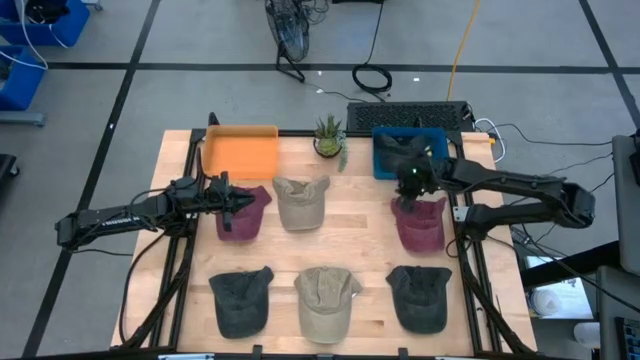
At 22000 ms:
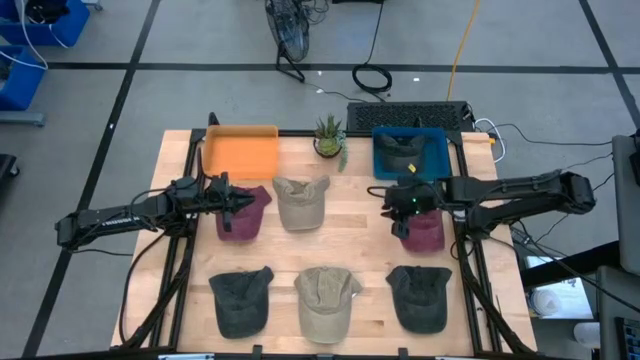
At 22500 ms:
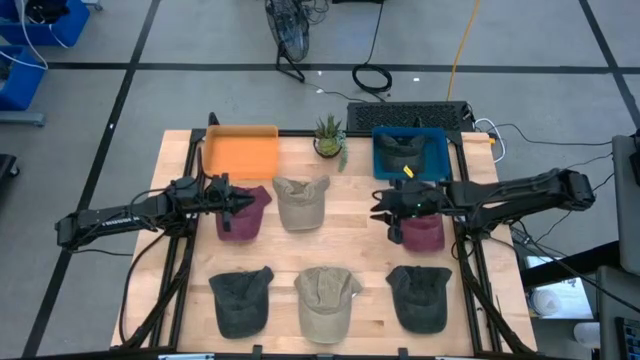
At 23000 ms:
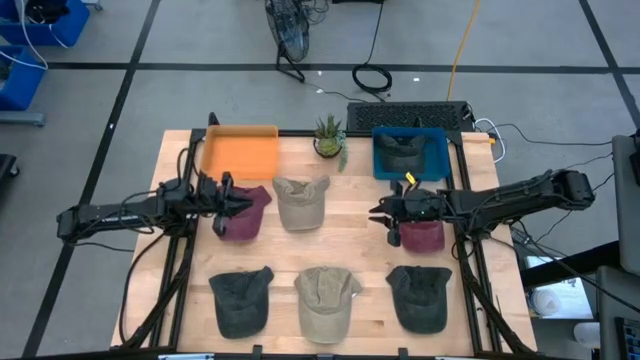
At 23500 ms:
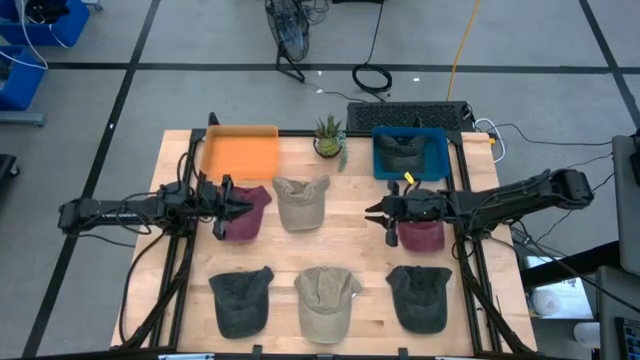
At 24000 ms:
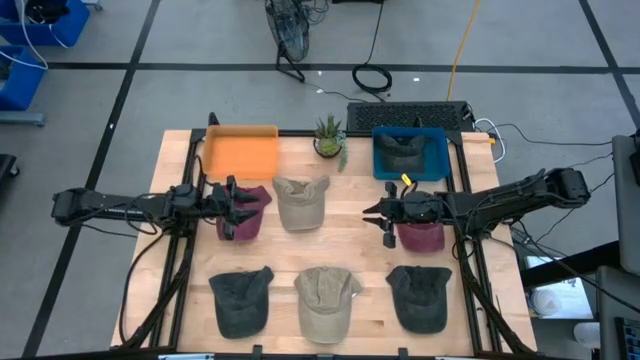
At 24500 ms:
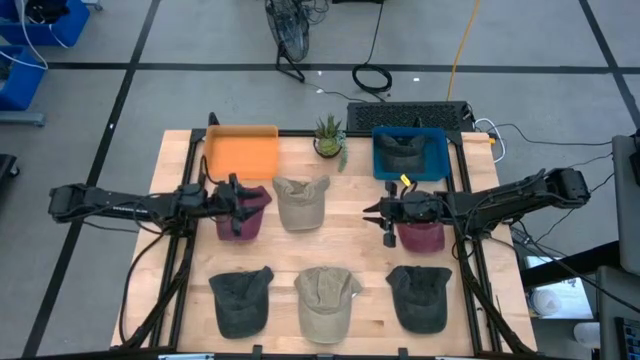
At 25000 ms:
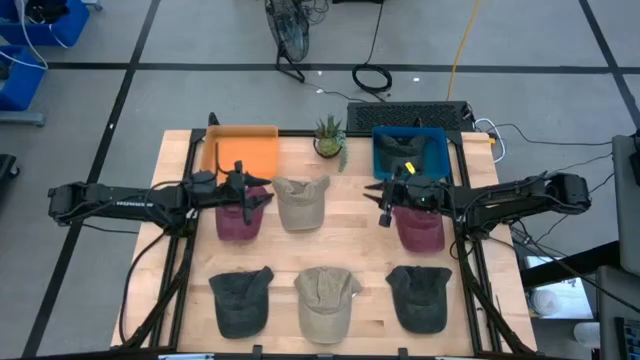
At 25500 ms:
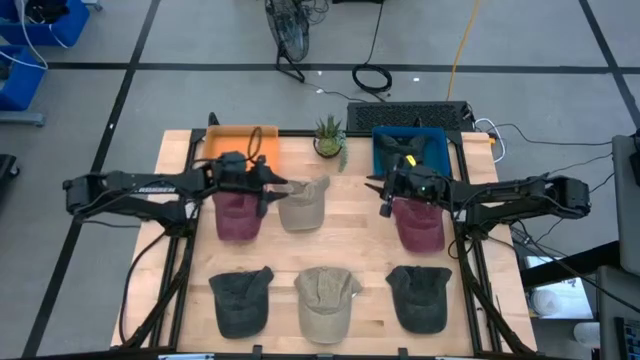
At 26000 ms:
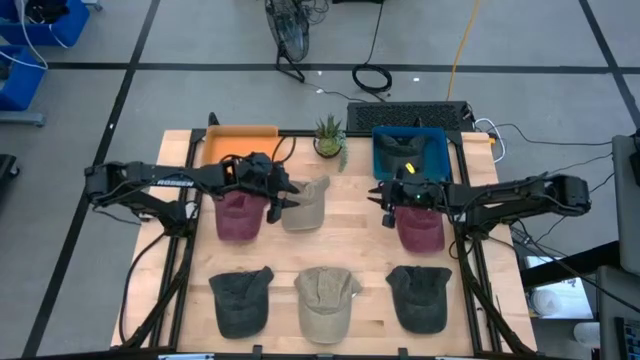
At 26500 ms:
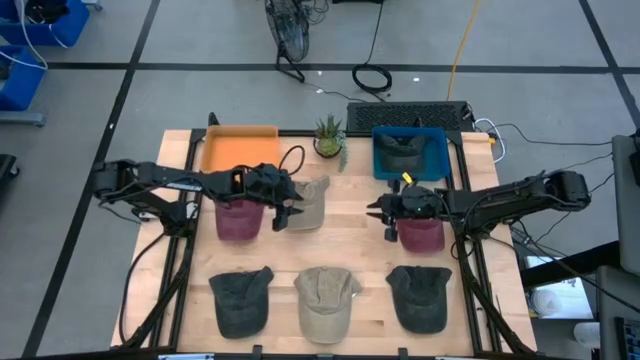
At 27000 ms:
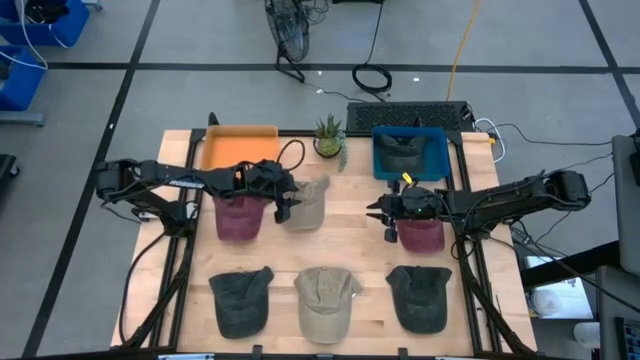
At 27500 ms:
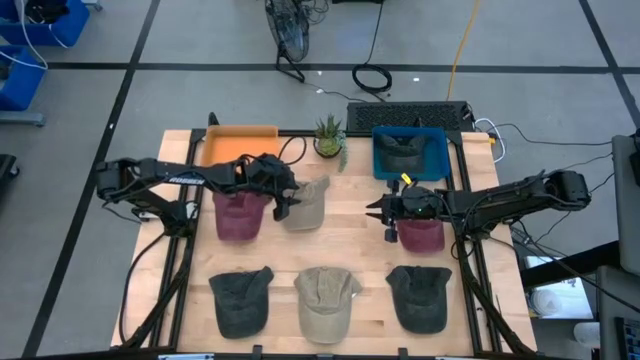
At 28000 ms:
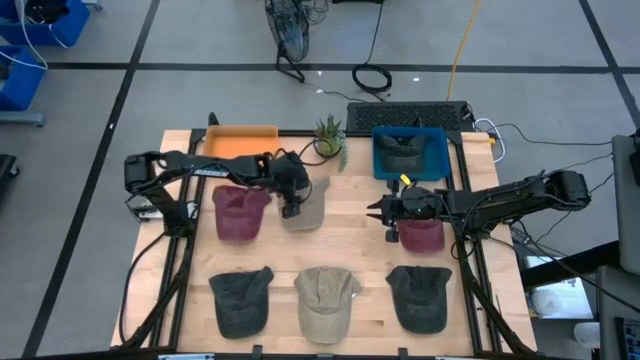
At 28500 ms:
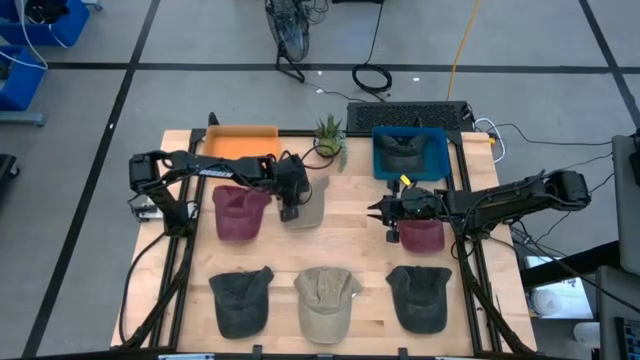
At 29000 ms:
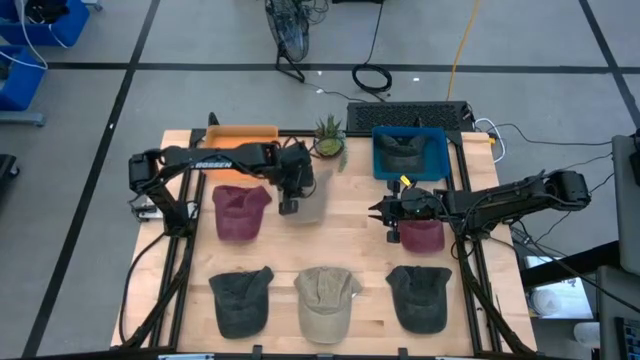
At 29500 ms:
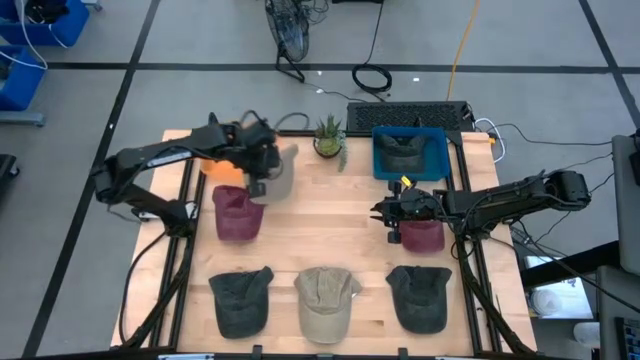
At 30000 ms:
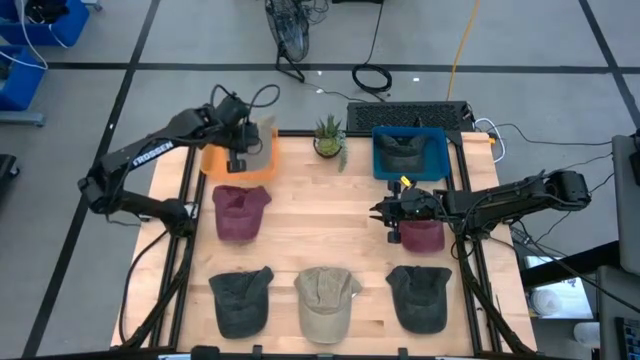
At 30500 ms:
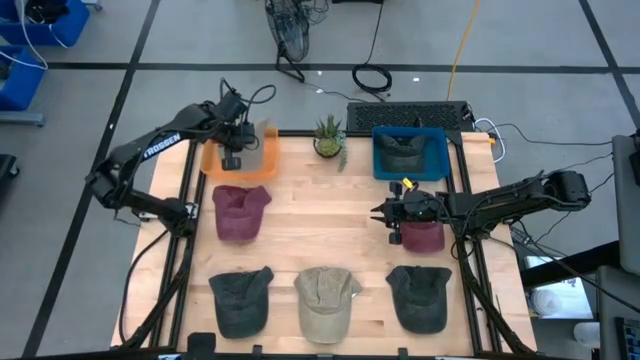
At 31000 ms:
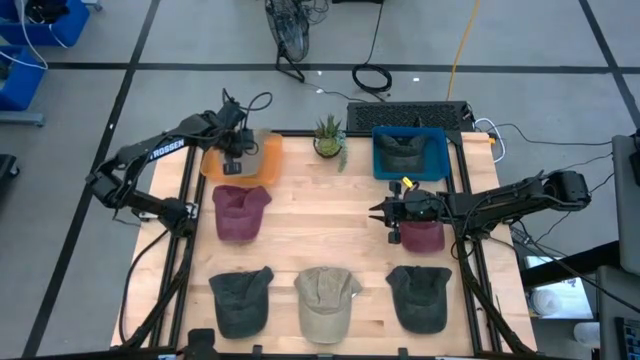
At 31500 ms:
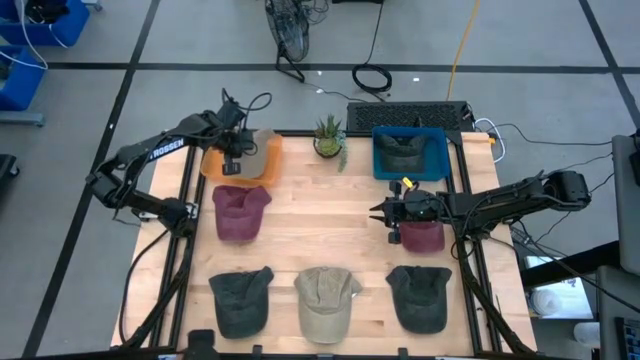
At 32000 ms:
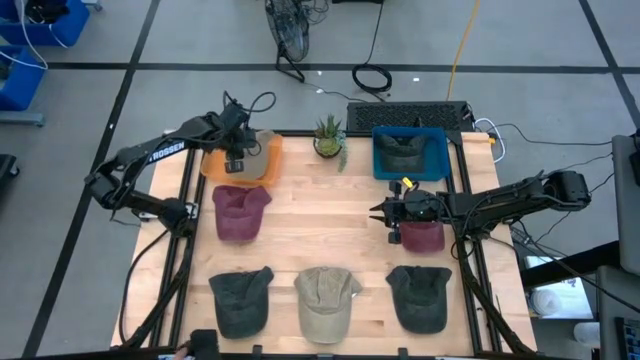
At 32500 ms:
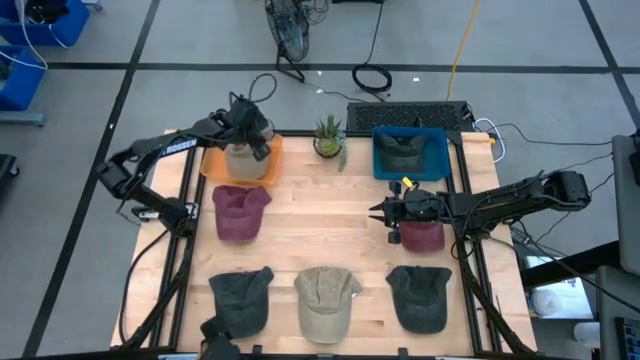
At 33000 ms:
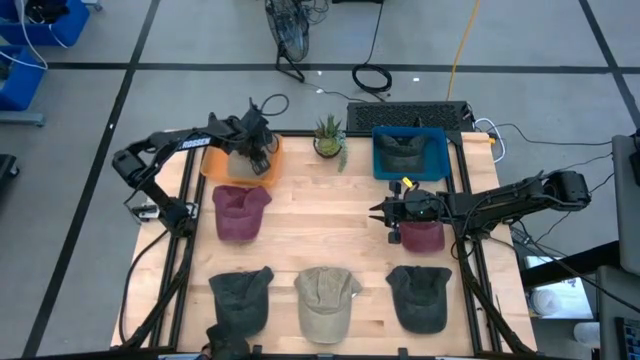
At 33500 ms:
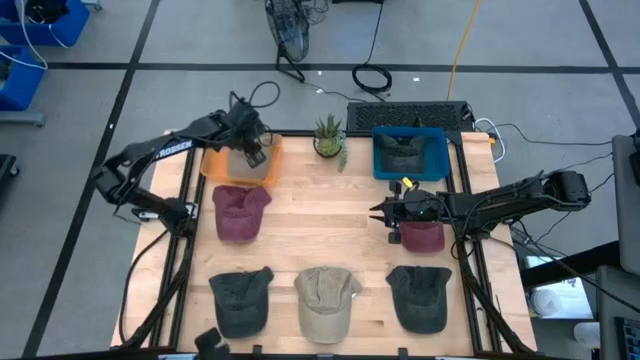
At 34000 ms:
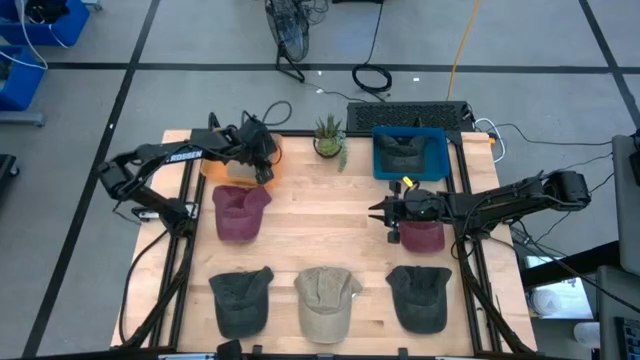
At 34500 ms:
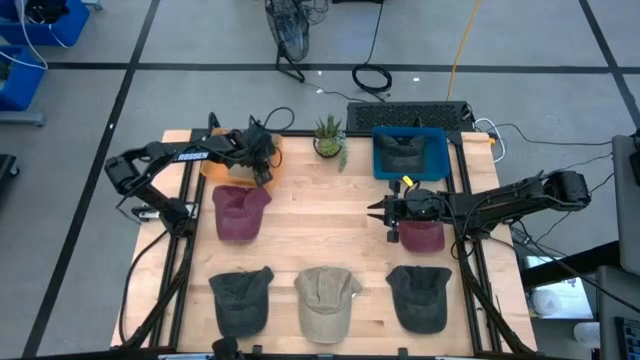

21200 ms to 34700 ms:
Task: Pick & Place hat
Put the top brown cap into the orange bin

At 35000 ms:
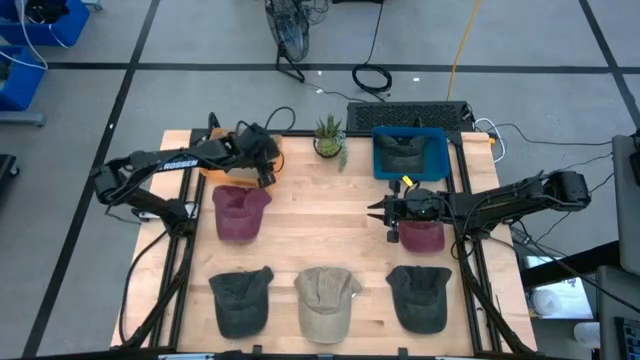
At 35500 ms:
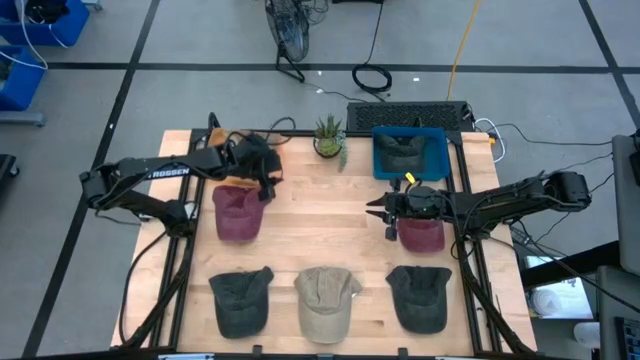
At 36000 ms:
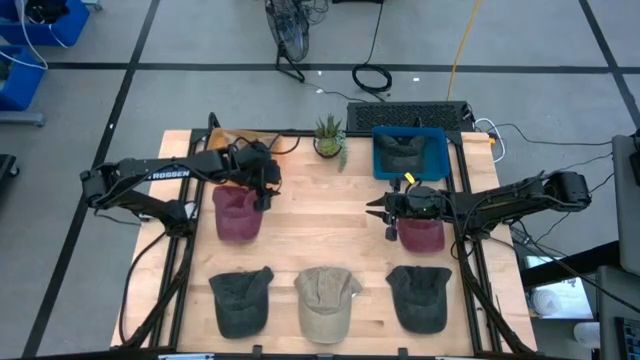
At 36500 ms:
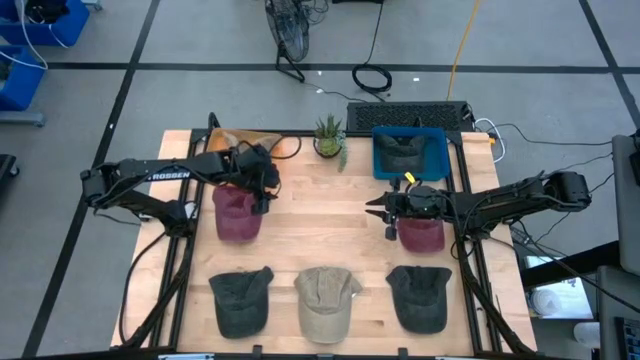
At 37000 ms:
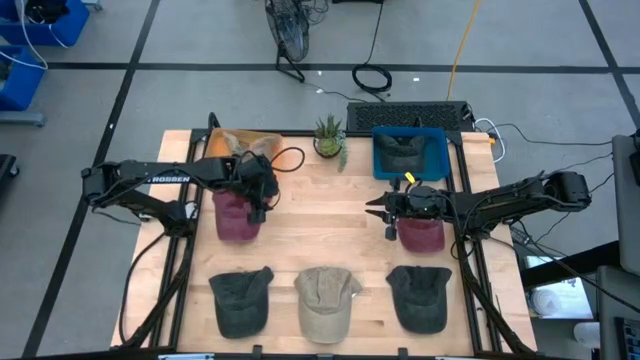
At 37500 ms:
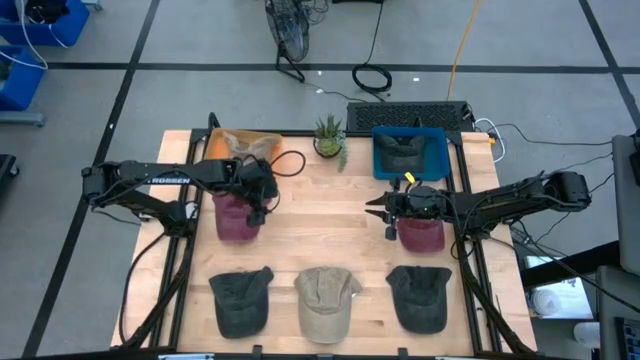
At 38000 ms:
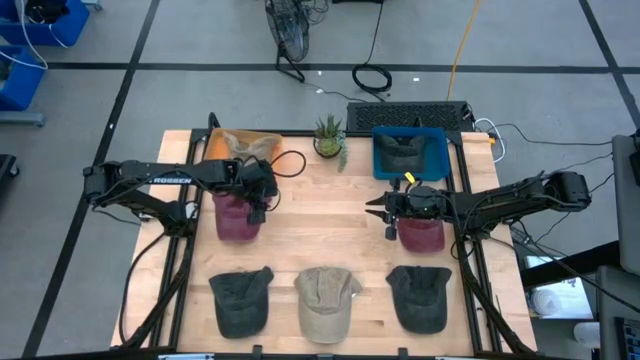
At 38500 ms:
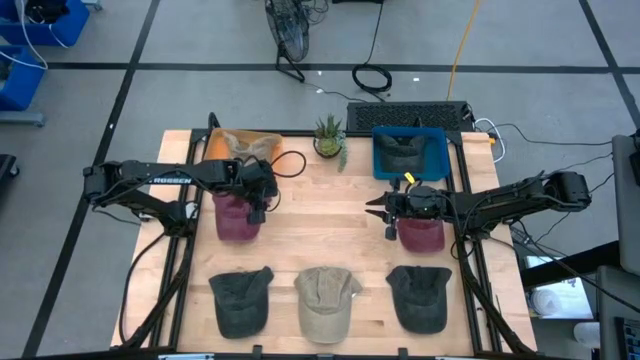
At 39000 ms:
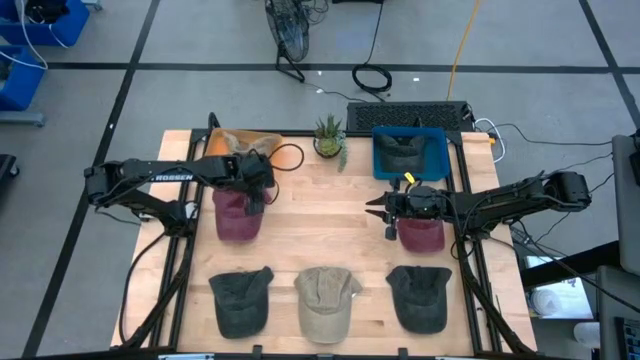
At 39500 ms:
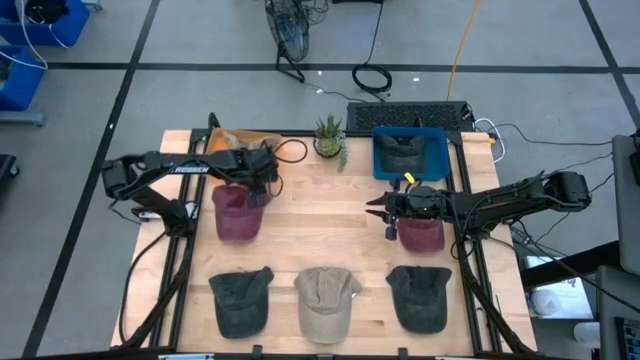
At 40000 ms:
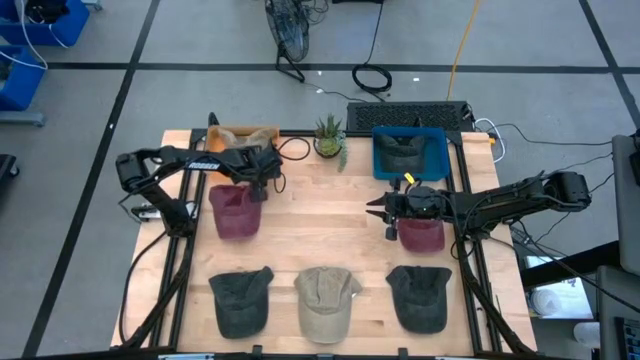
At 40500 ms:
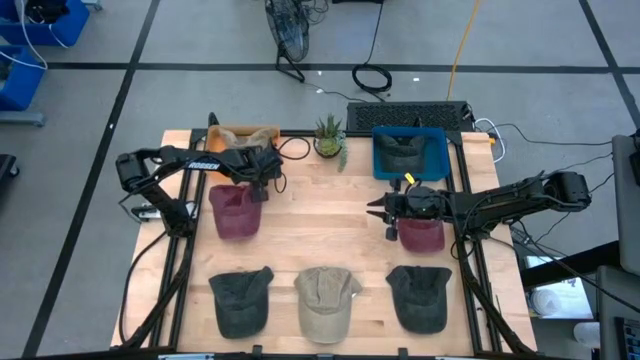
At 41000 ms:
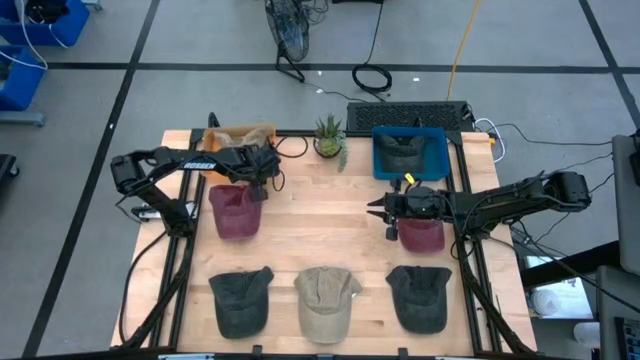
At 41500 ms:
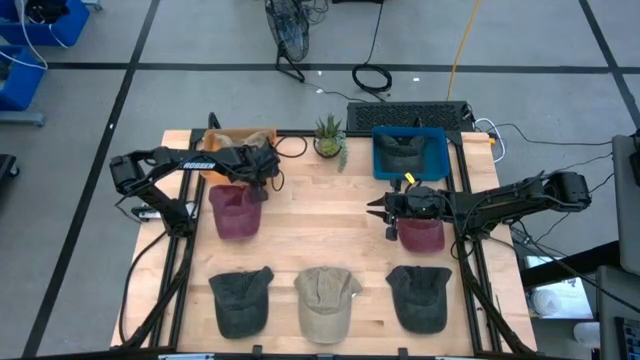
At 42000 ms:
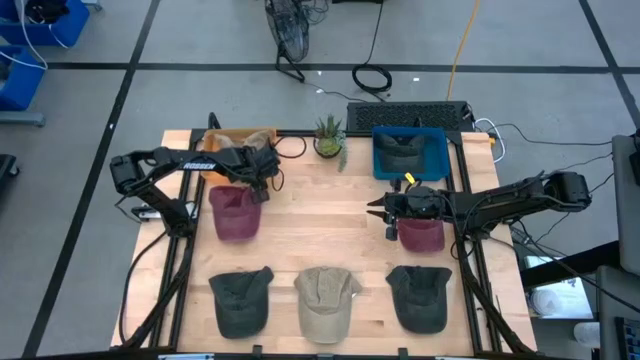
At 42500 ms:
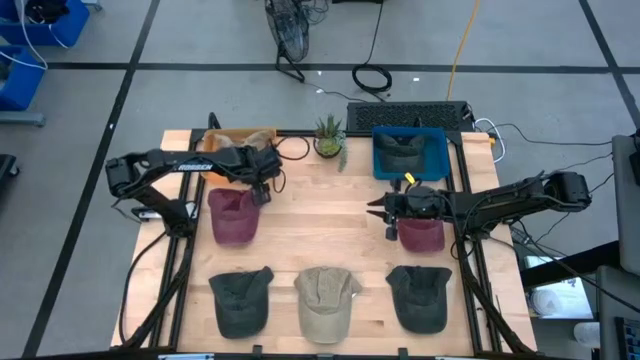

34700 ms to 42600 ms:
Adjust the orange bin
